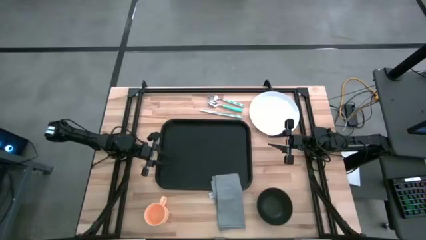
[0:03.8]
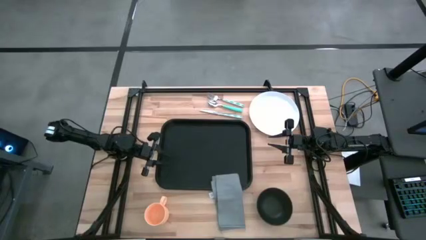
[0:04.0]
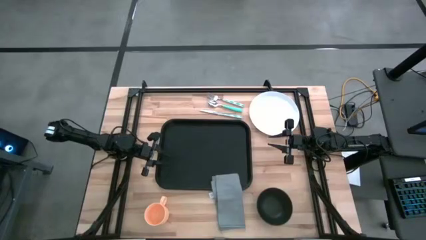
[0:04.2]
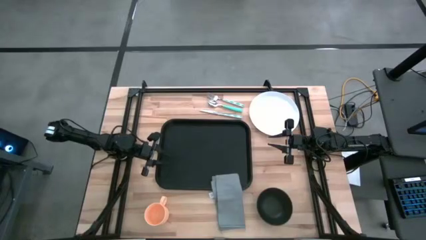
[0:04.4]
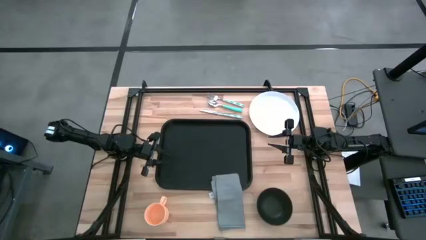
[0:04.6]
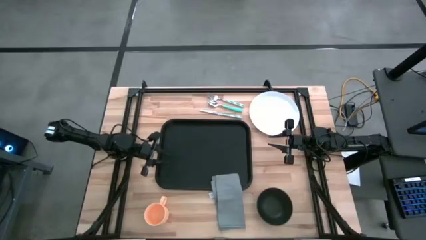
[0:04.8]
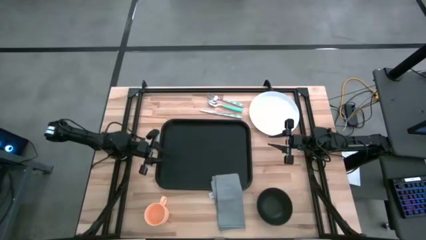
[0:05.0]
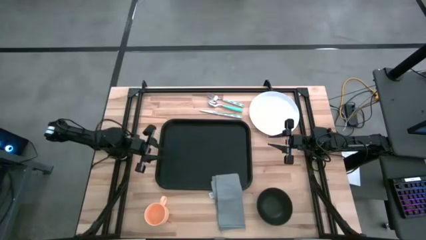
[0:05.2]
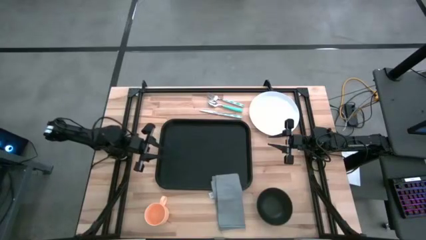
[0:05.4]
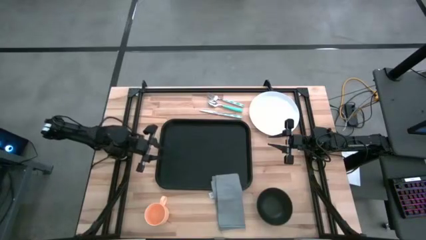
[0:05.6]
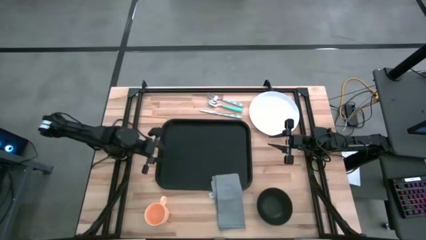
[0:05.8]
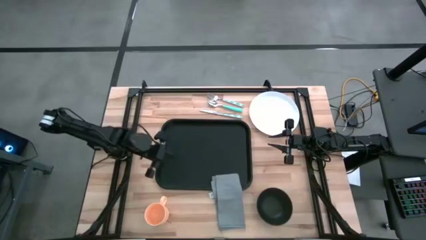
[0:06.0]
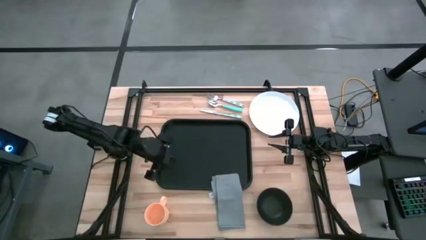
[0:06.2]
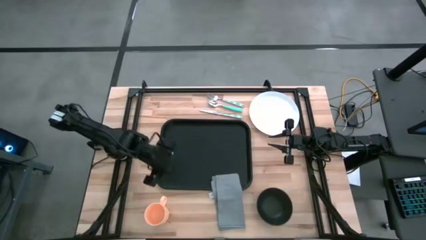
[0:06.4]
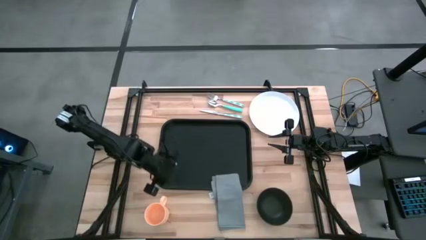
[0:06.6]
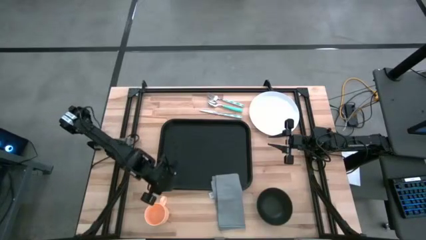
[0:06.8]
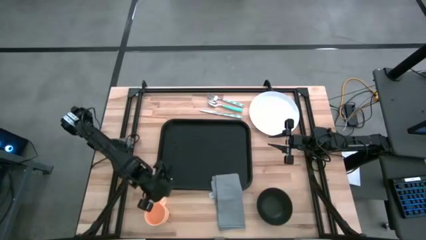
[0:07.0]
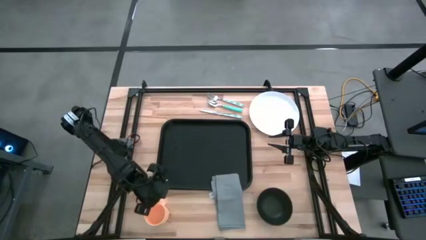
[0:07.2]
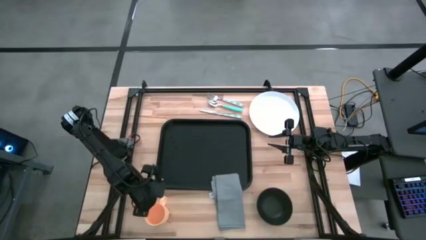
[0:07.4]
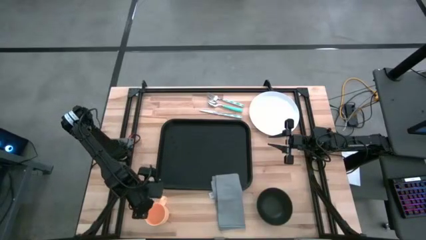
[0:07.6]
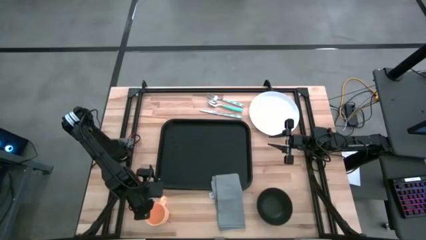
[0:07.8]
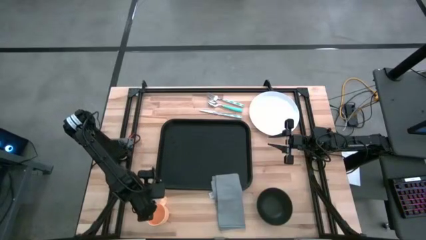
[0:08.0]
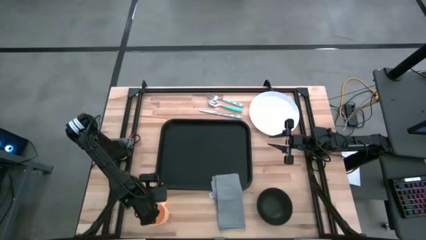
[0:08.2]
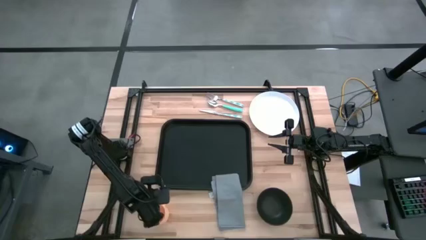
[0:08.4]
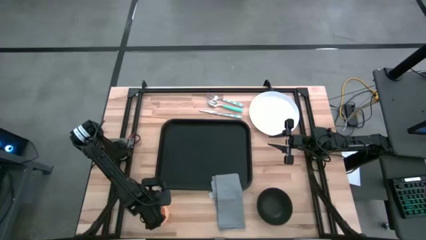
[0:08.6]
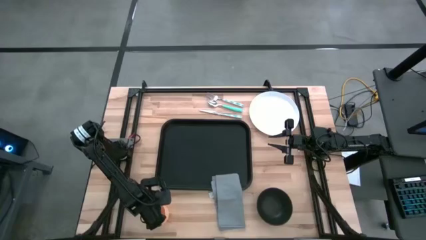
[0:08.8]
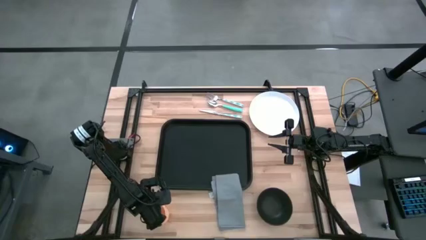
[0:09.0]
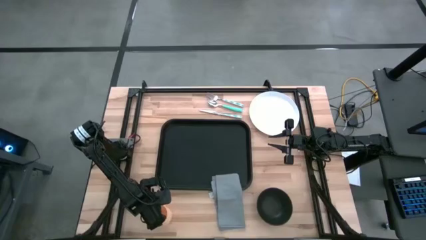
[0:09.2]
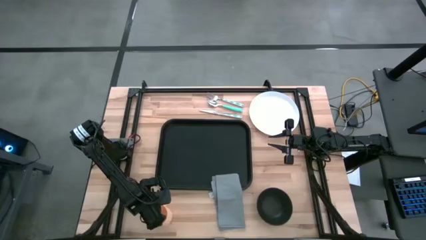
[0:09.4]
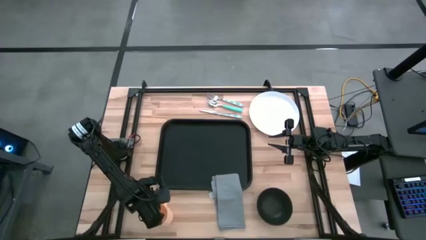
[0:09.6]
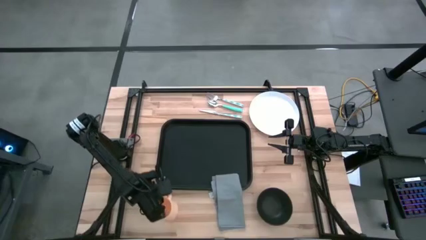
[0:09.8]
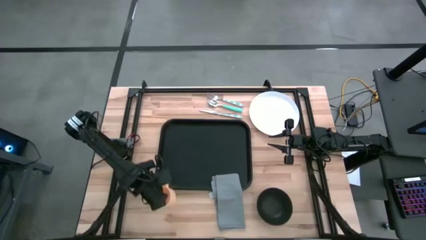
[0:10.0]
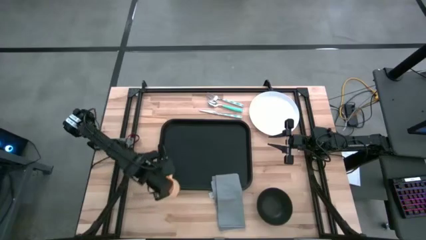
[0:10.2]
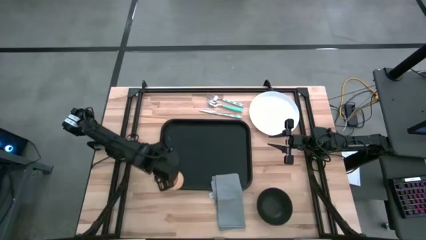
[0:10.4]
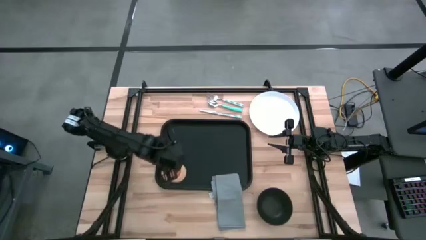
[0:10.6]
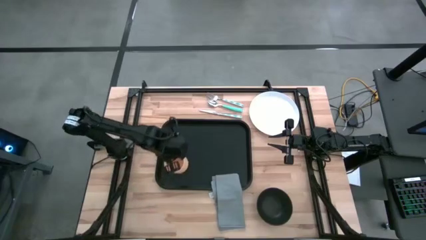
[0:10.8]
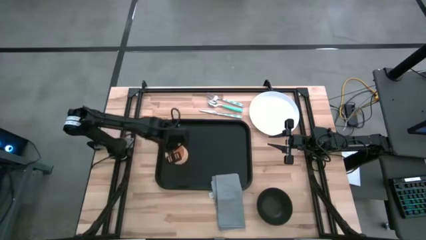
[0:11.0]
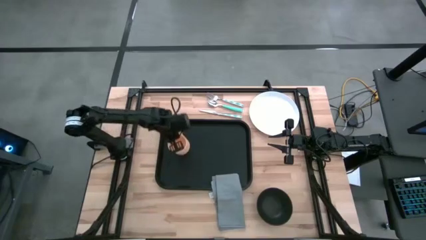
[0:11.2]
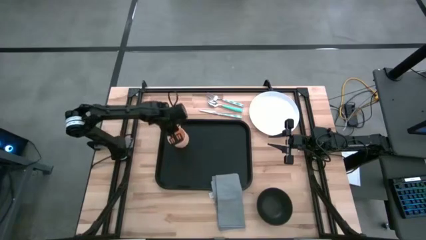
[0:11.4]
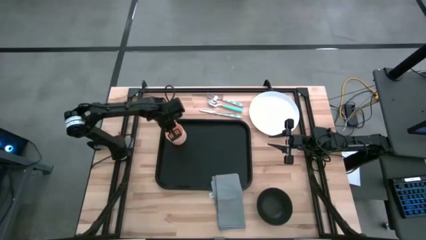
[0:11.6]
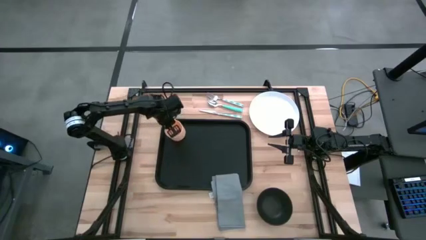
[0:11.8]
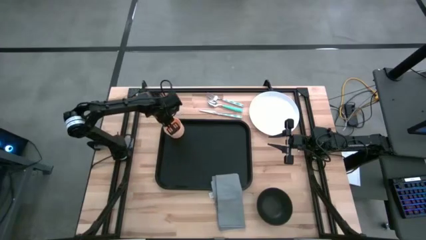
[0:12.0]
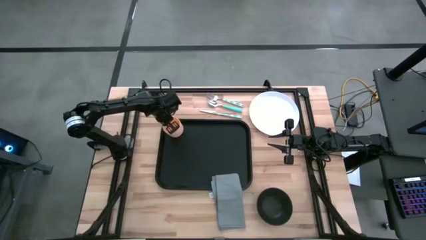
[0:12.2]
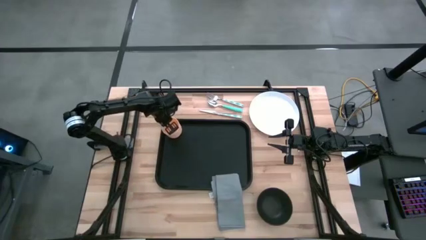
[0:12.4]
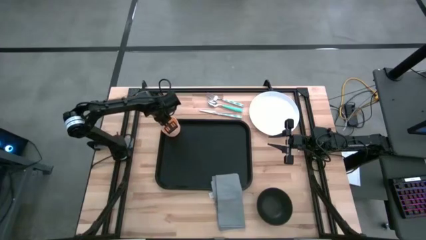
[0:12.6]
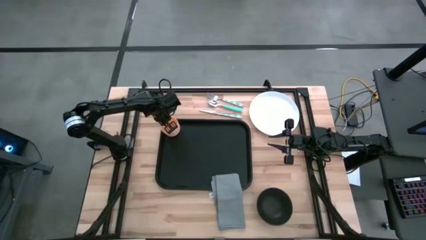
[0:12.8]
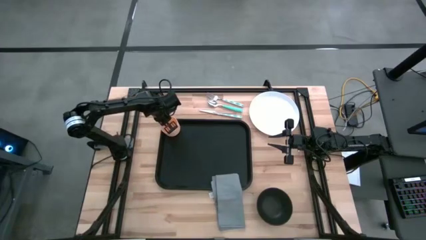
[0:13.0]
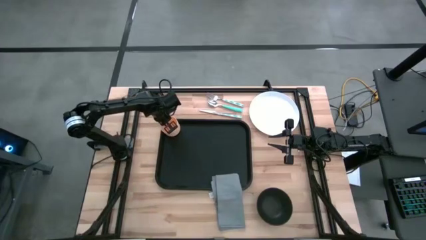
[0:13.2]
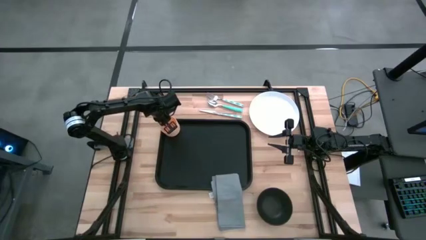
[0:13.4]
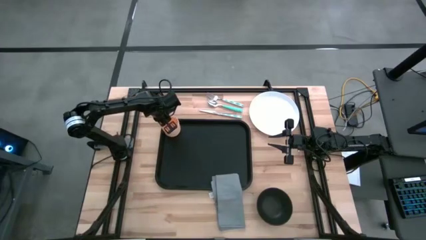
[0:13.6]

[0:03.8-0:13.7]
Task: Set up tray
Put the orange cup on the black table tray

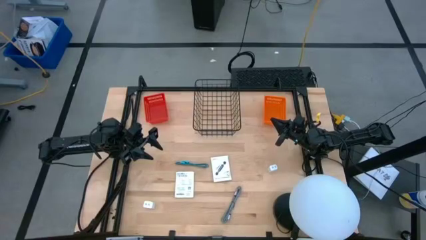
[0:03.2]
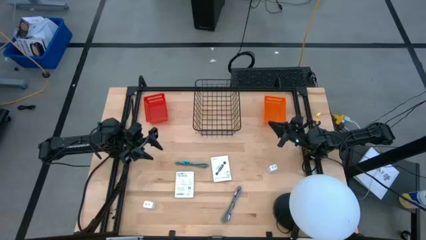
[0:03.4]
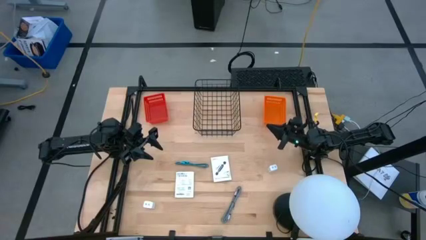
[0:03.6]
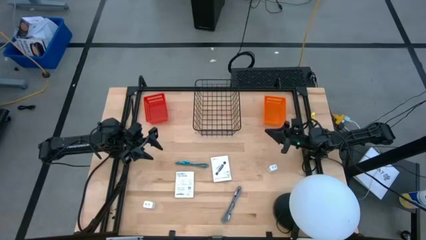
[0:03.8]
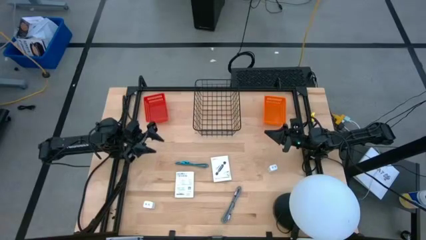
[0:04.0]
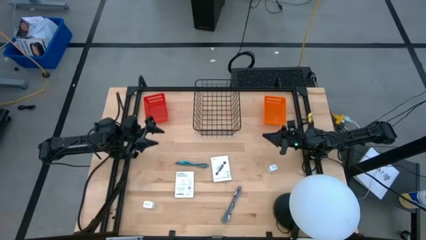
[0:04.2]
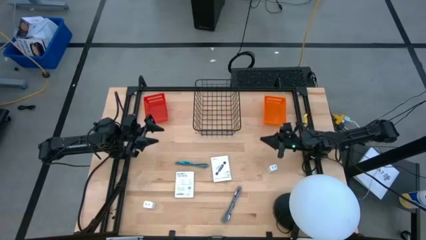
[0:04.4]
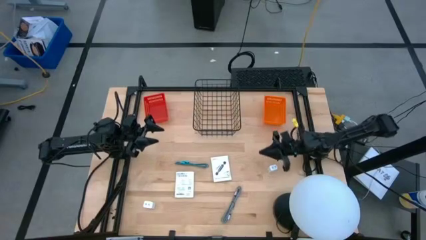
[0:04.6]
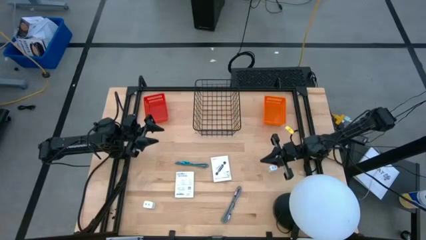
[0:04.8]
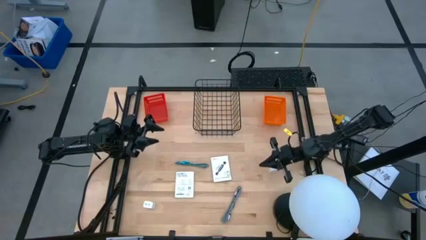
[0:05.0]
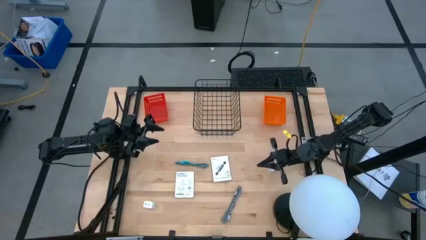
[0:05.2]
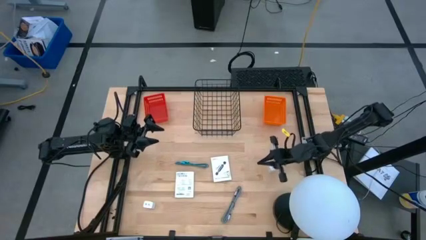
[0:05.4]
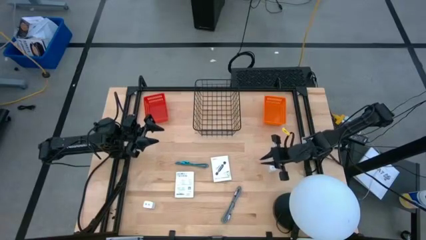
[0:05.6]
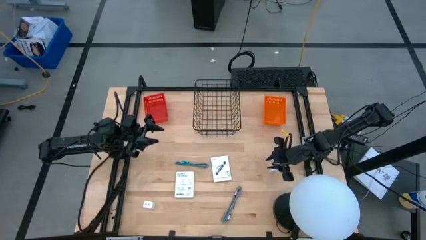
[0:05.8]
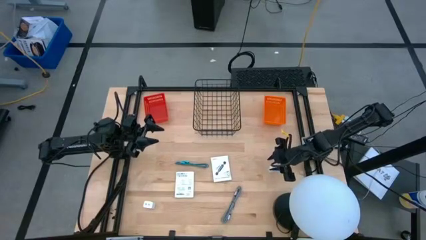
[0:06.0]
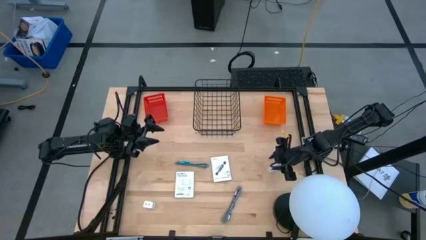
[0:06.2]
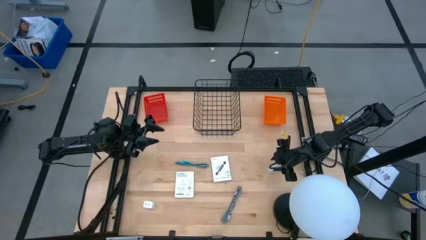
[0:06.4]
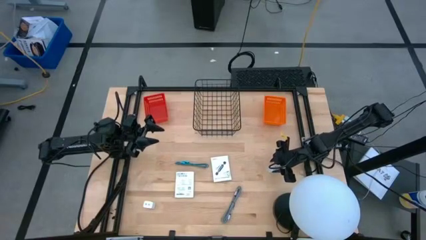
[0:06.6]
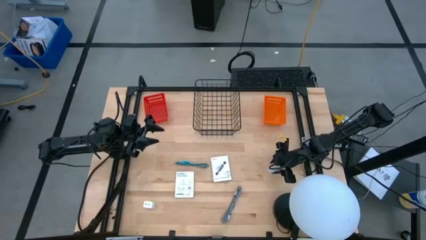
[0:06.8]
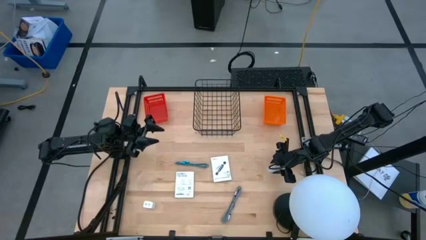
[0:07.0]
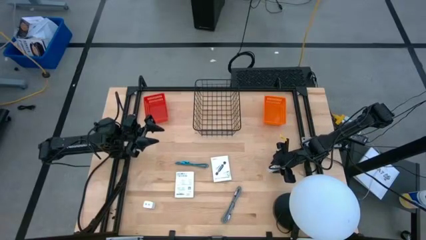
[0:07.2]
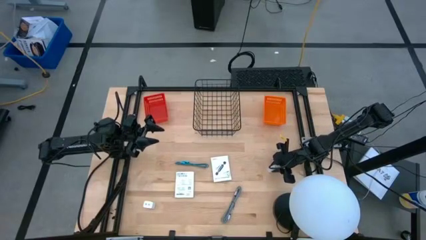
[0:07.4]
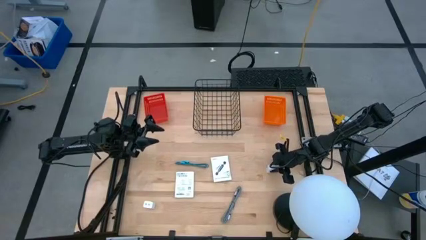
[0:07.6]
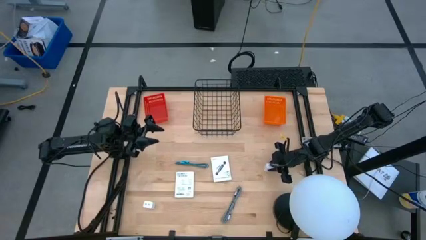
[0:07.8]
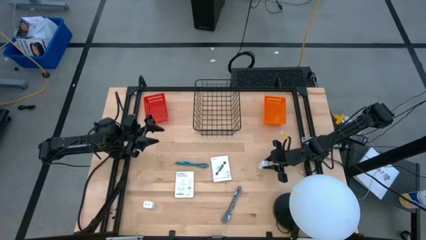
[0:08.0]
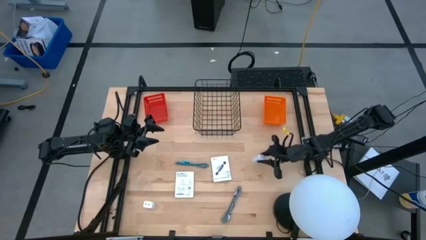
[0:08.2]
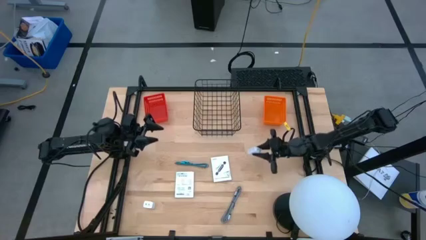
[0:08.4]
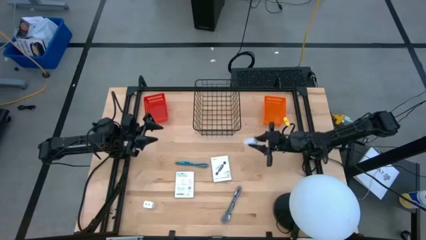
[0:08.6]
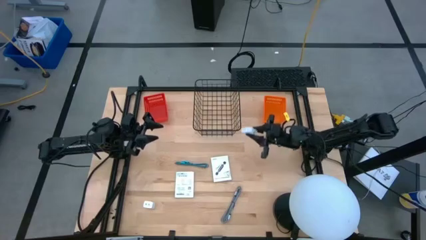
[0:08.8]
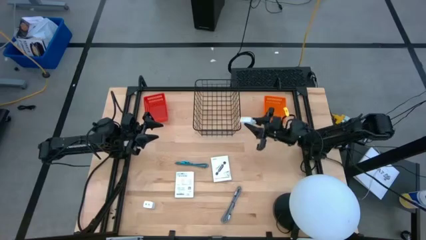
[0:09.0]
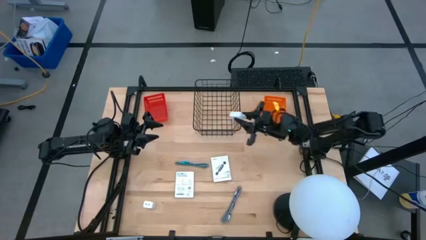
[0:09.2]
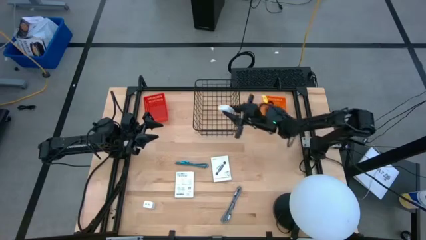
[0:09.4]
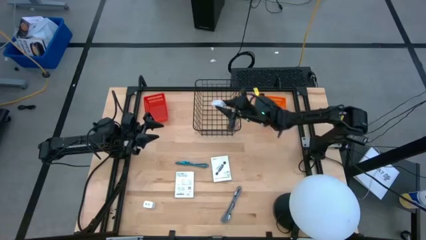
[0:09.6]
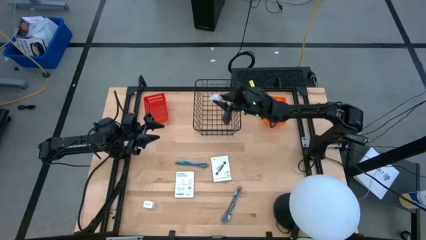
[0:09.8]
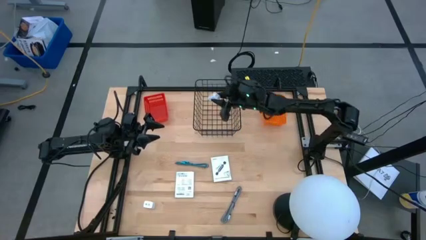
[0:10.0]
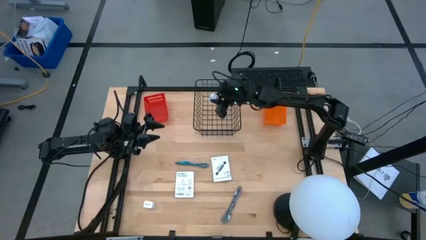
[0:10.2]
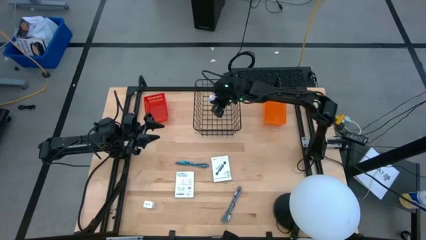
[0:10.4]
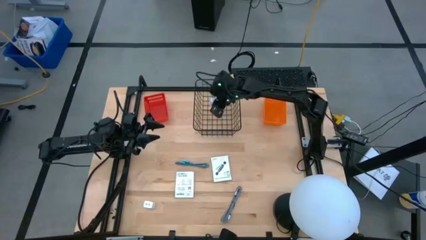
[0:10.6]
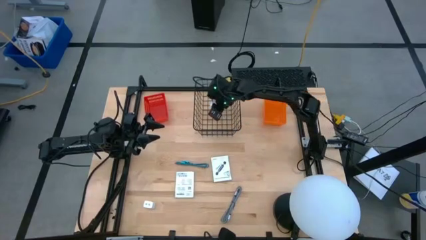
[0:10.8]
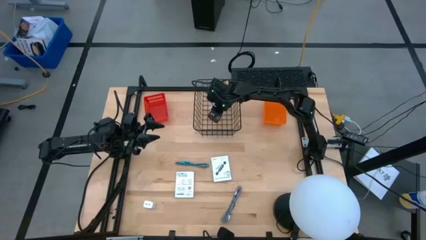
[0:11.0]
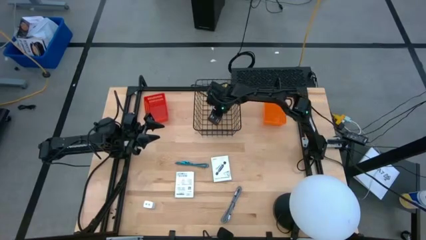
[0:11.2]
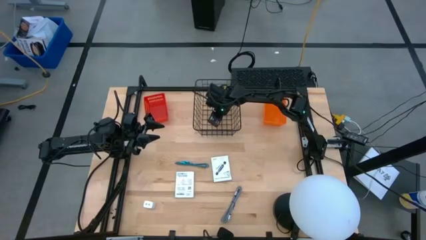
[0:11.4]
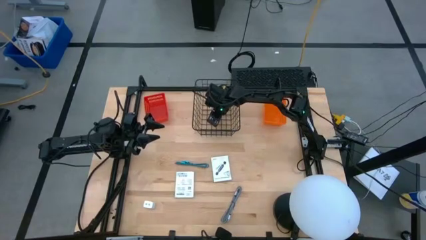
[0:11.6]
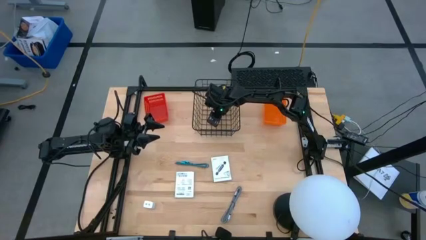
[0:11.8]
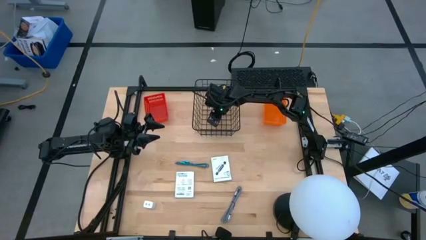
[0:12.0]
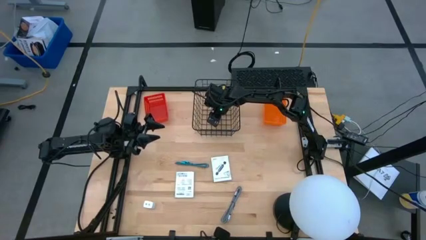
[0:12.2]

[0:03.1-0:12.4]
Task: Pick and place items into bin
Put the right white charger adapter into the black wire basket
